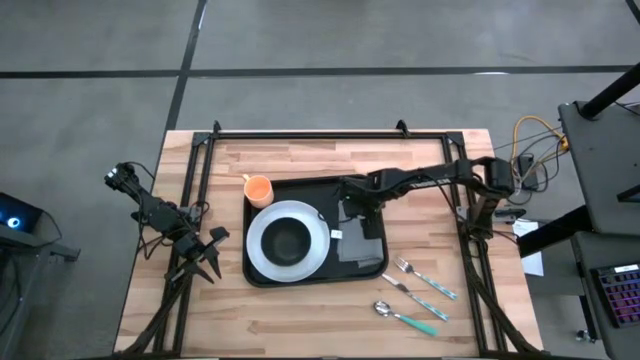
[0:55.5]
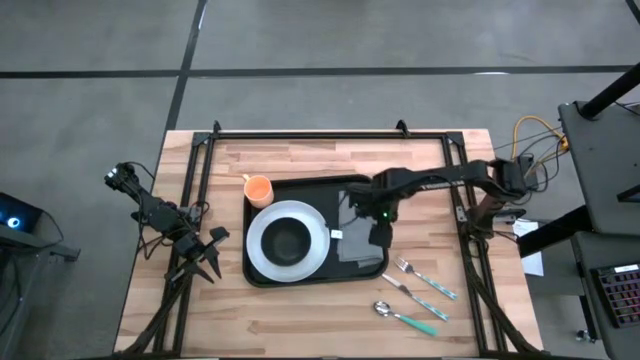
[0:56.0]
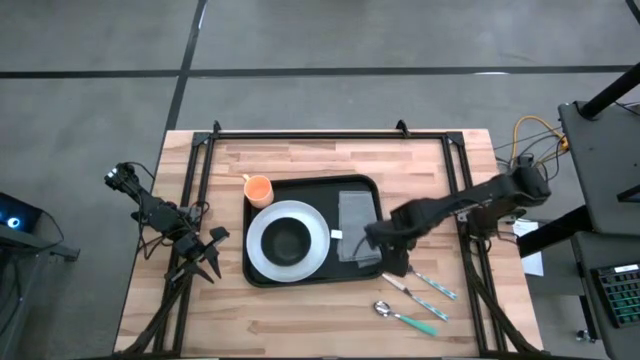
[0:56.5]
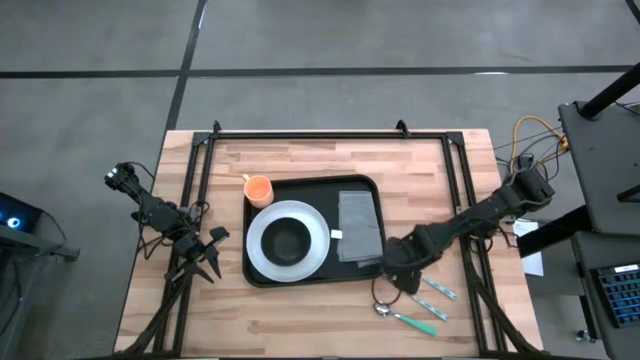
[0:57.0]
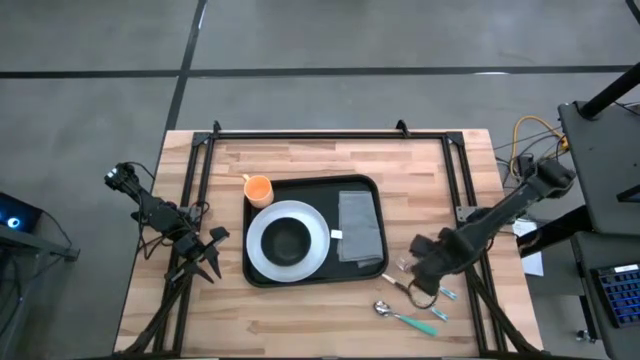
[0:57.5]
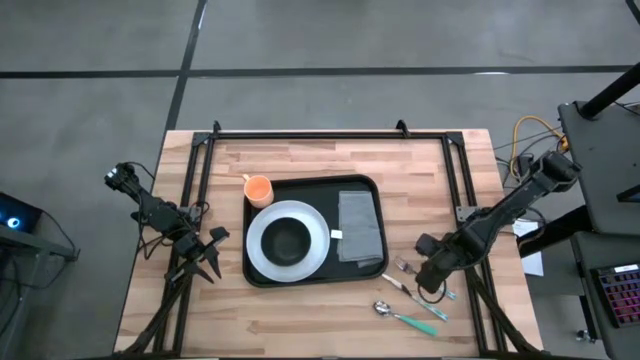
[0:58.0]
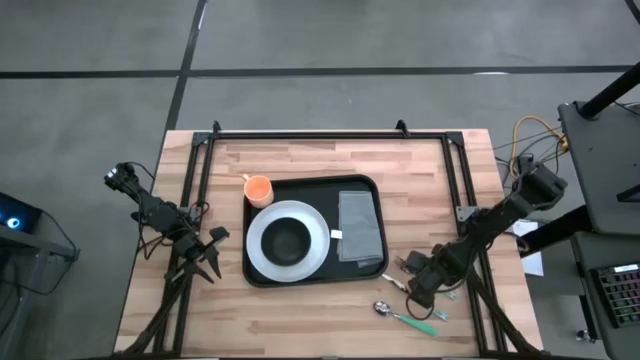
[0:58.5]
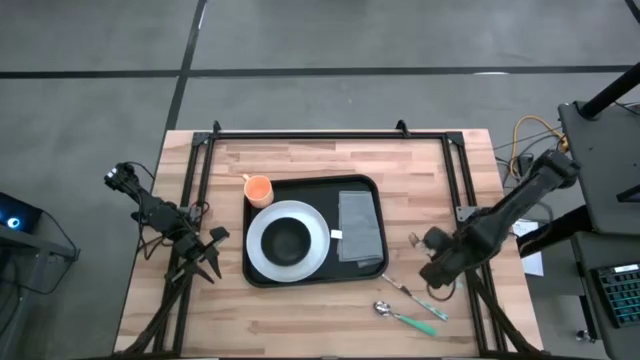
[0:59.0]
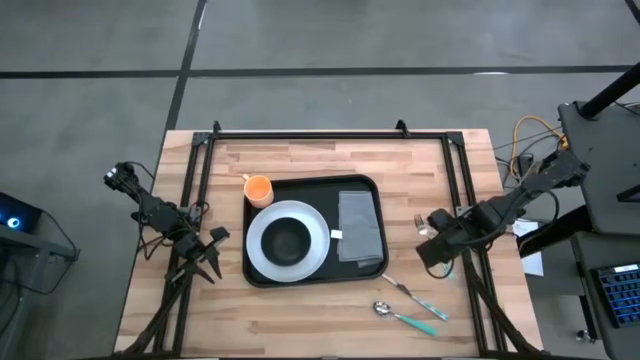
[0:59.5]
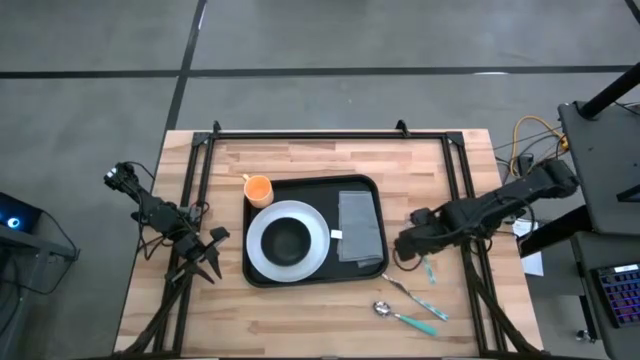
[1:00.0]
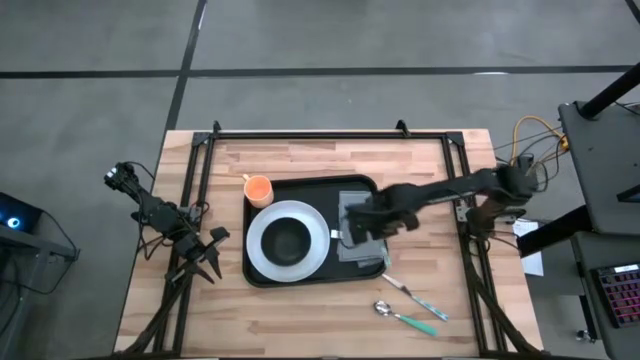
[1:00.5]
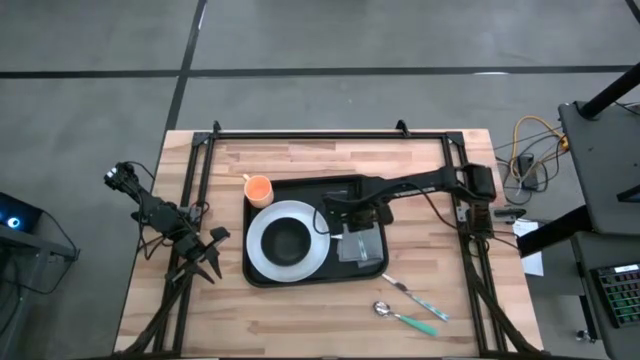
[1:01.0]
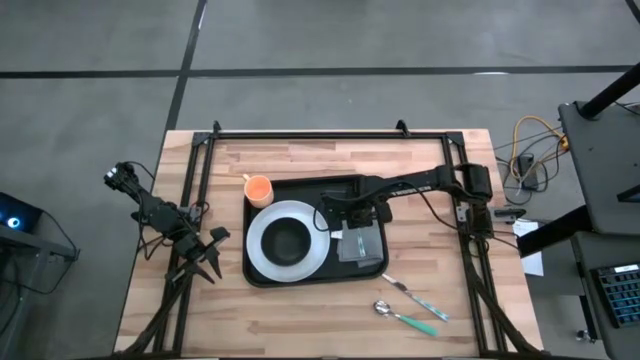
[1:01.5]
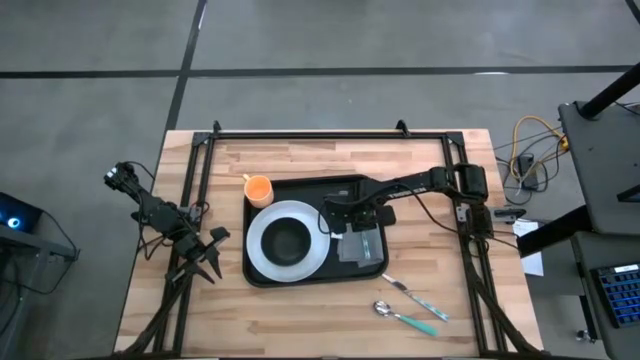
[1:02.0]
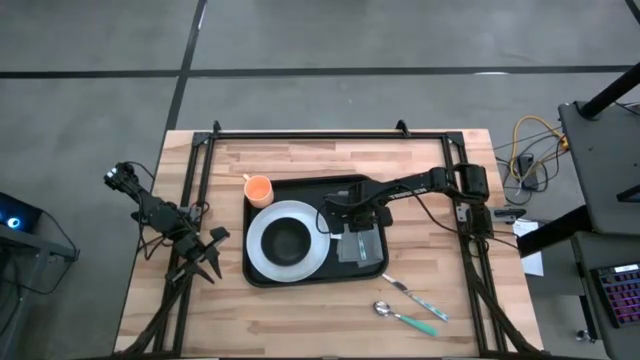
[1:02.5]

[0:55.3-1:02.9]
Task: Set up tray
Put the blue fork on the gray table napkin on the black serving tray

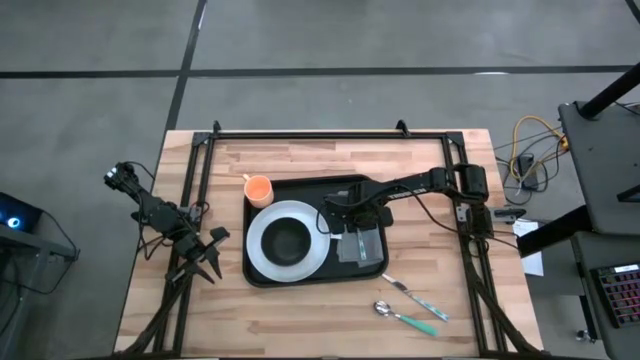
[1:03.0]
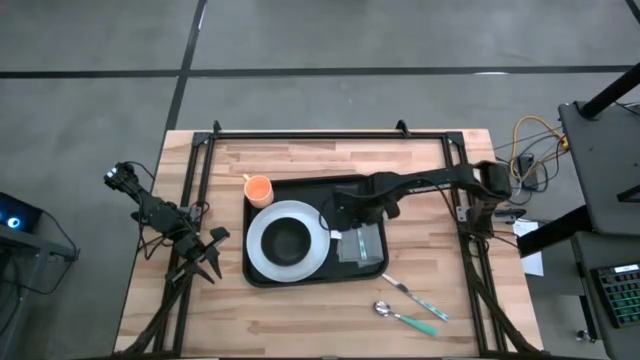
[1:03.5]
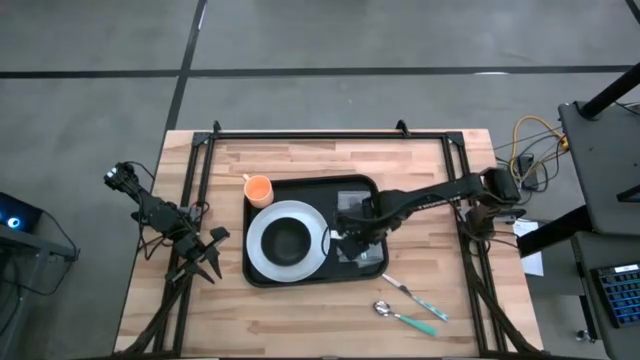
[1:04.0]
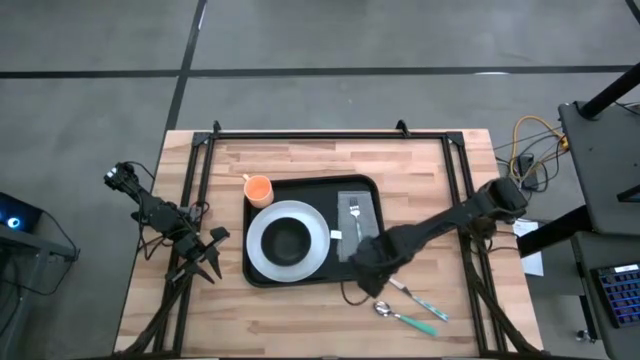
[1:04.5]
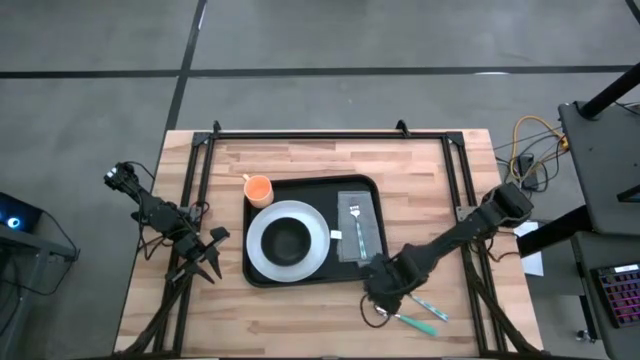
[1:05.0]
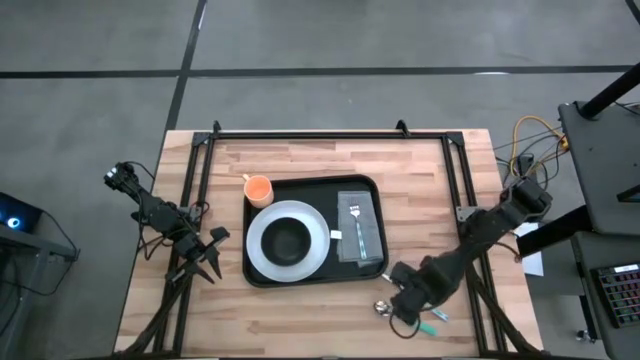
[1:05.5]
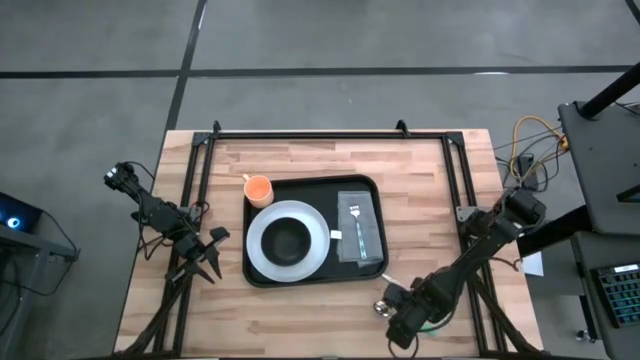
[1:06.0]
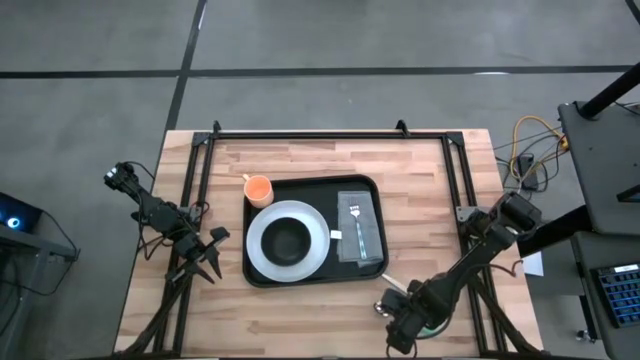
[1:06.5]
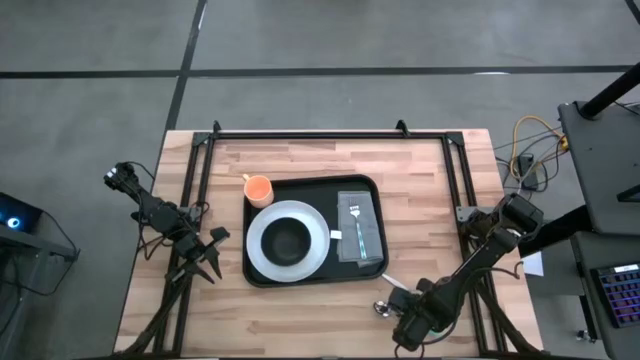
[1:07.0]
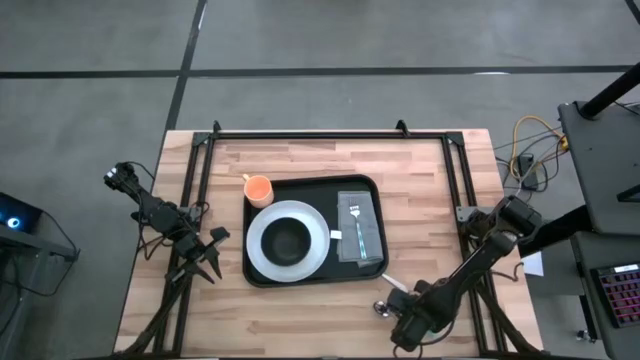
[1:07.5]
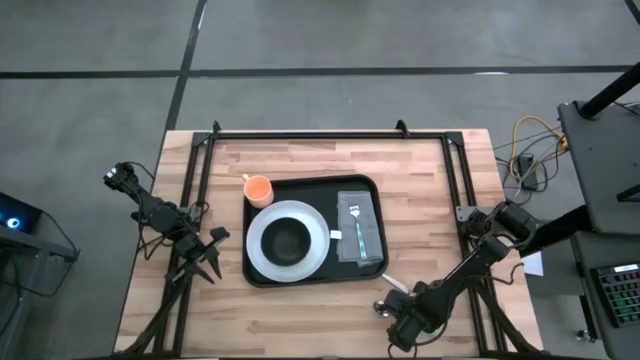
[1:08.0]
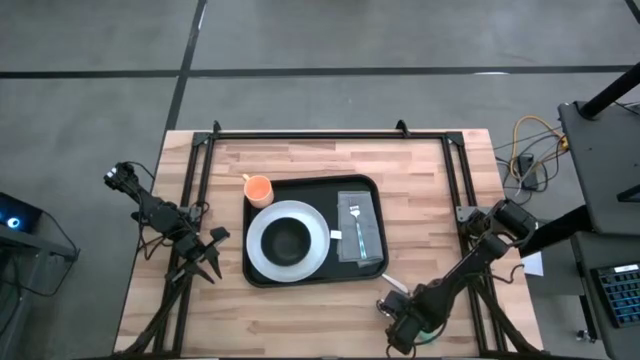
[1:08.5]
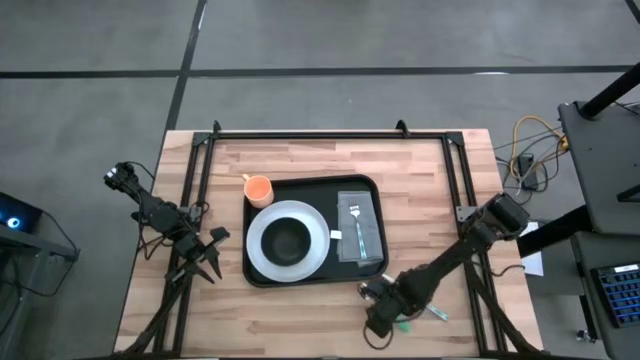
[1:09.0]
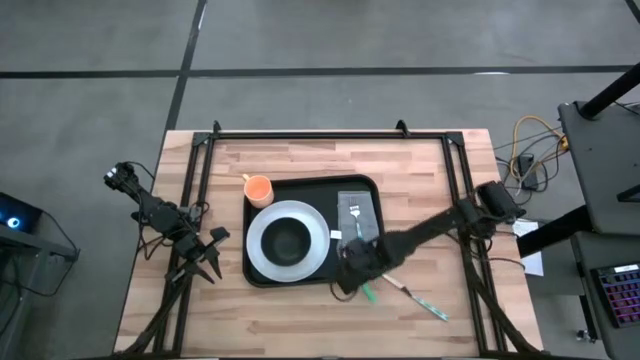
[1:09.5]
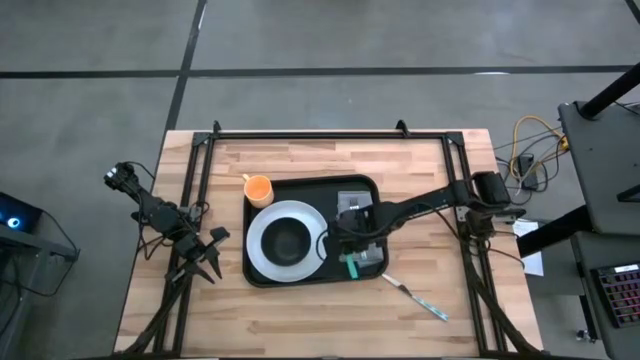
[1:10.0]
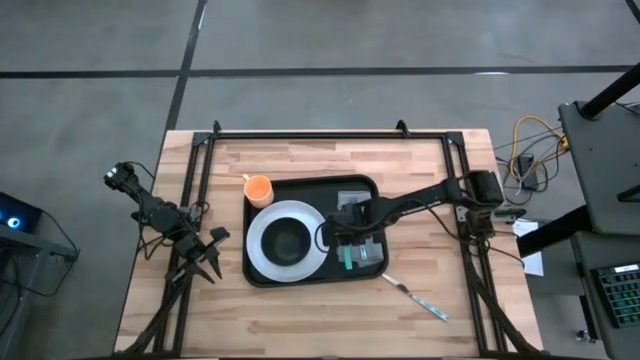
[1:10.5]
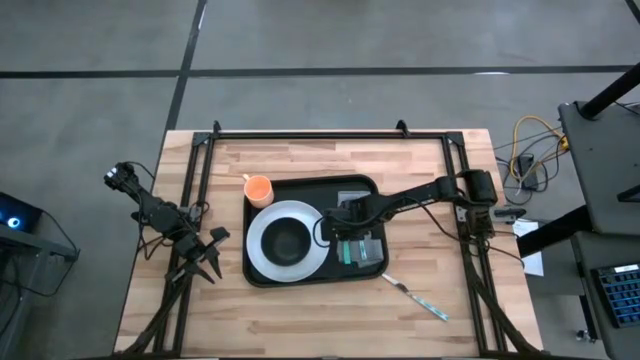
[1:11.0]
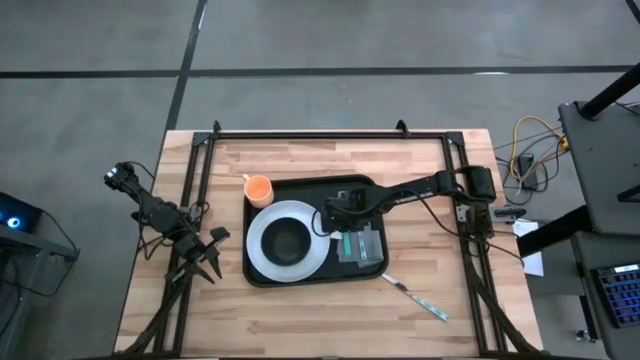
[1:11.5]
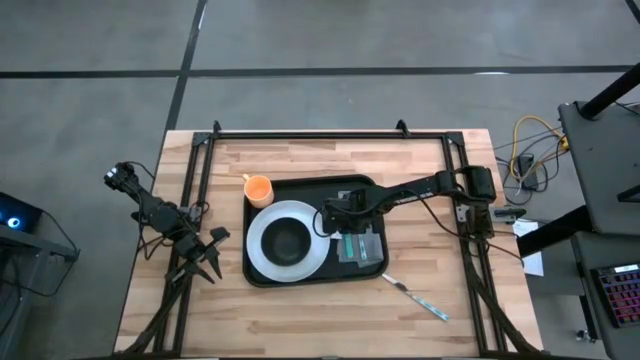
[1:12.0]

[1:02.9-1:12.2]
Put the green spoon to the left of the blue fork on gray table napkin on the black serving tray
